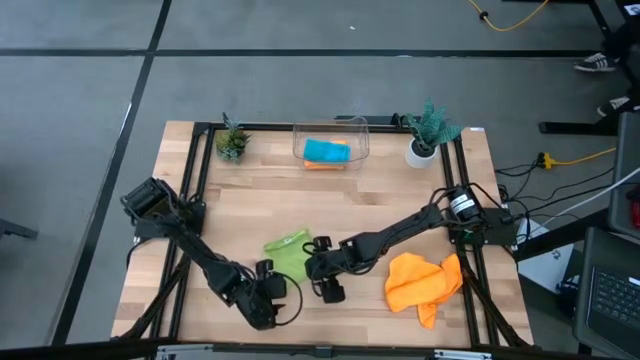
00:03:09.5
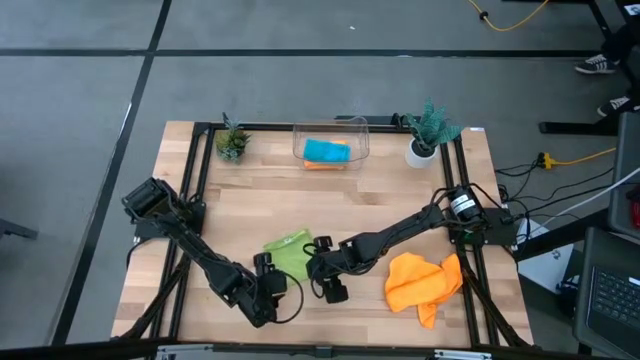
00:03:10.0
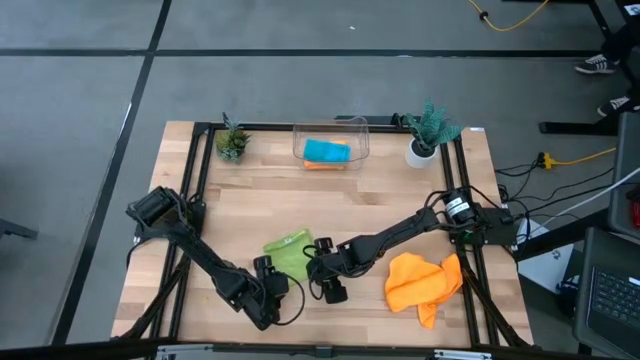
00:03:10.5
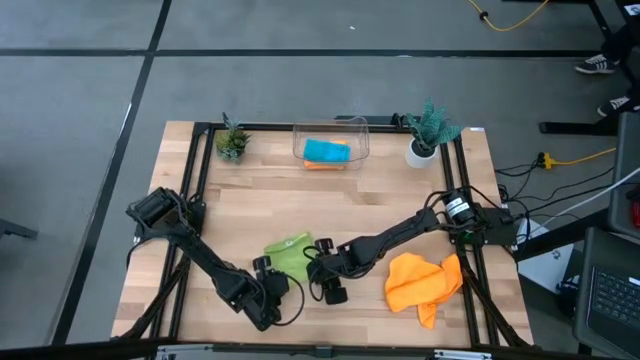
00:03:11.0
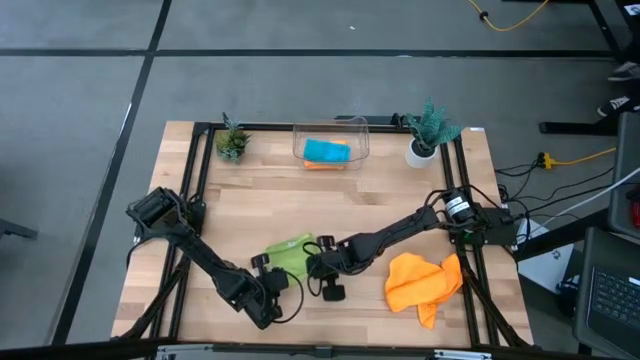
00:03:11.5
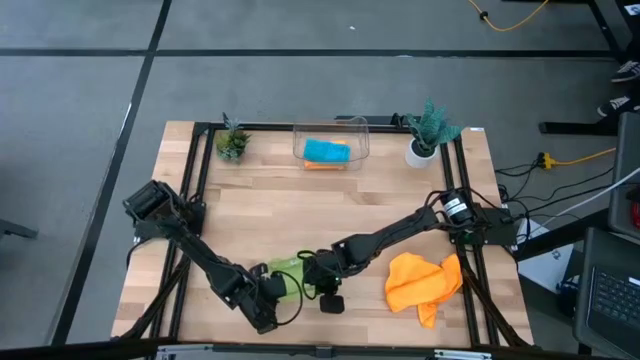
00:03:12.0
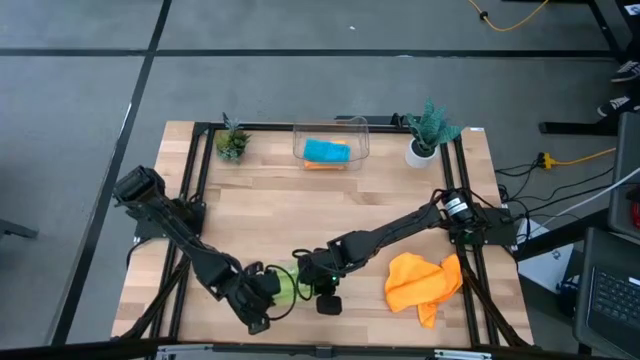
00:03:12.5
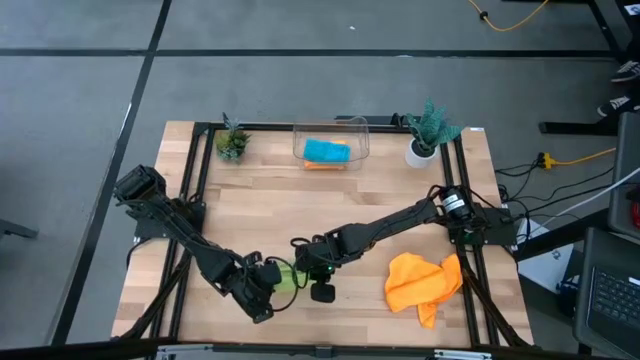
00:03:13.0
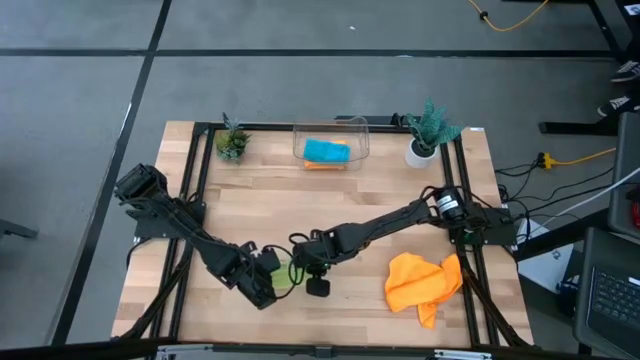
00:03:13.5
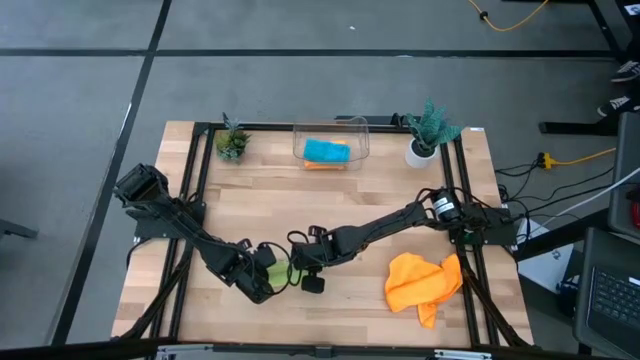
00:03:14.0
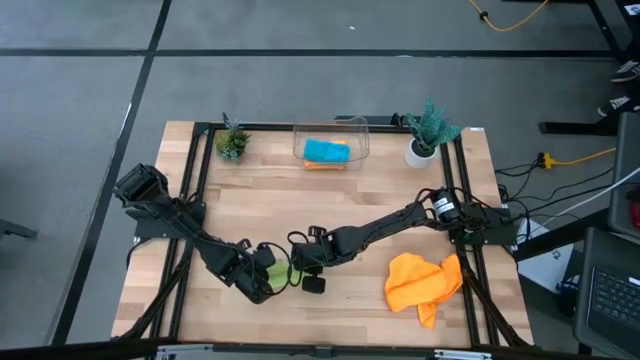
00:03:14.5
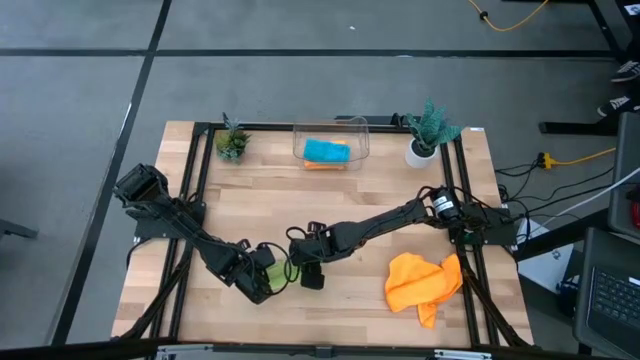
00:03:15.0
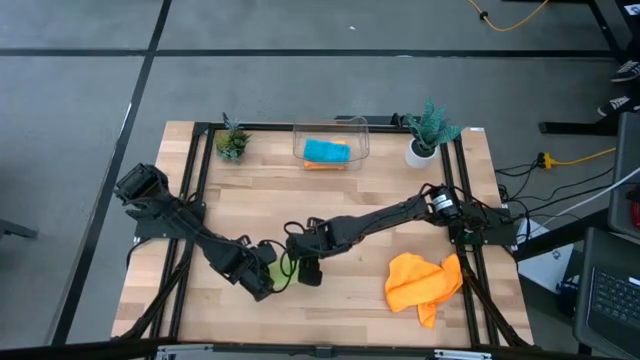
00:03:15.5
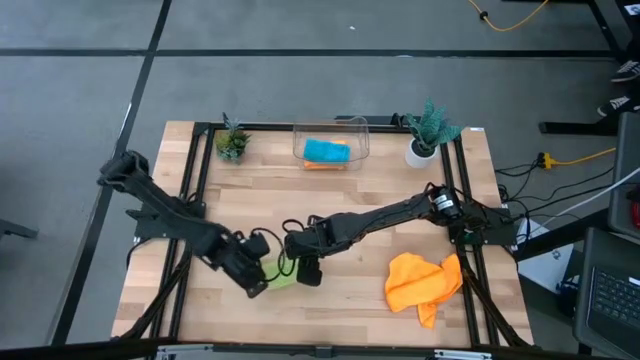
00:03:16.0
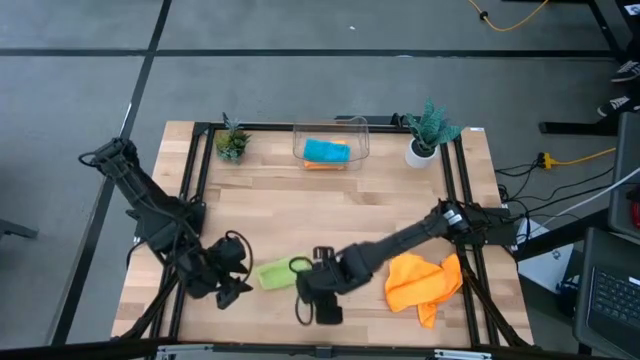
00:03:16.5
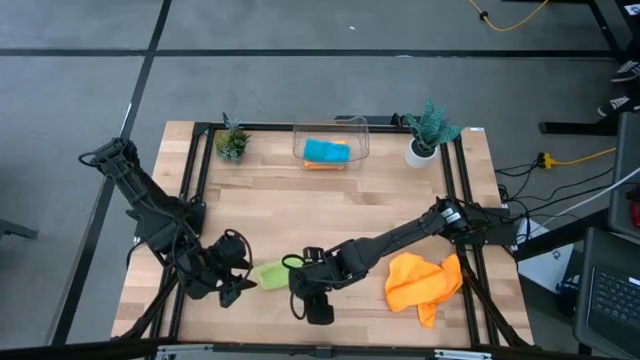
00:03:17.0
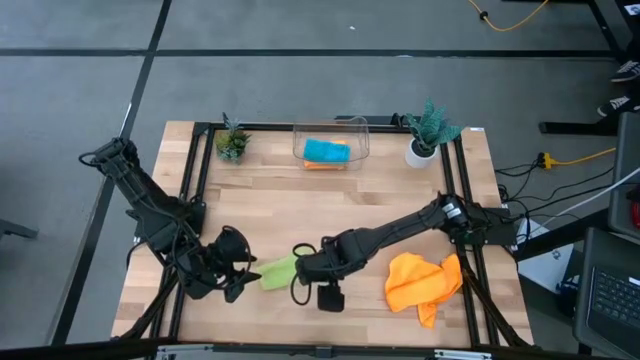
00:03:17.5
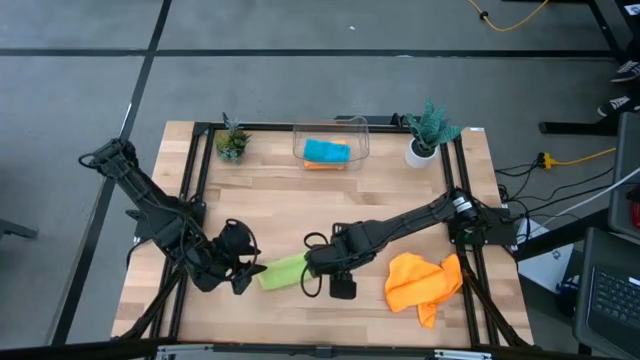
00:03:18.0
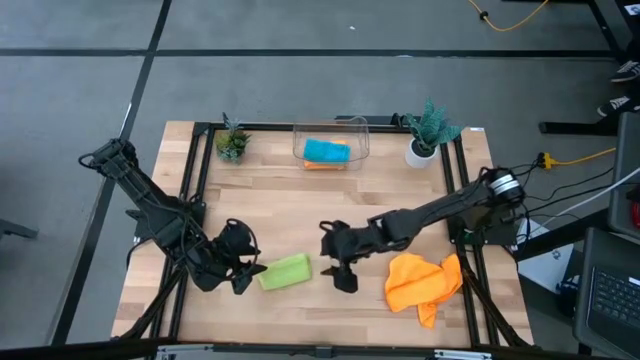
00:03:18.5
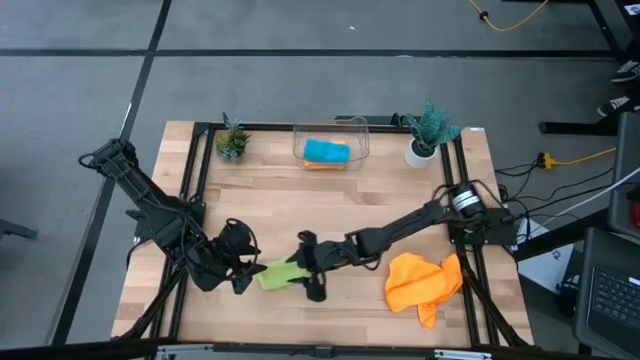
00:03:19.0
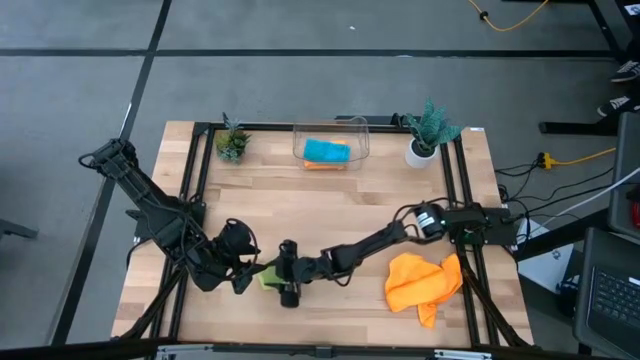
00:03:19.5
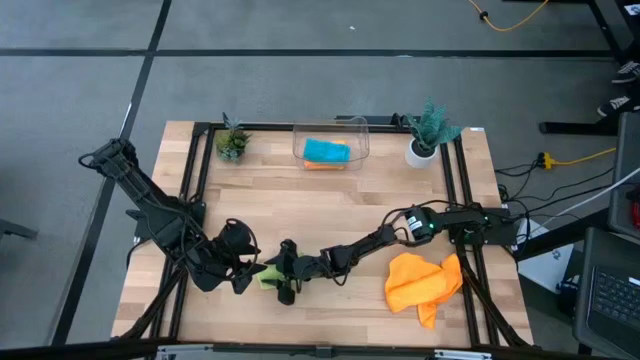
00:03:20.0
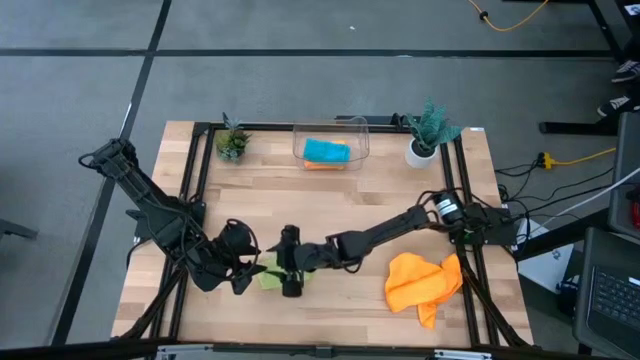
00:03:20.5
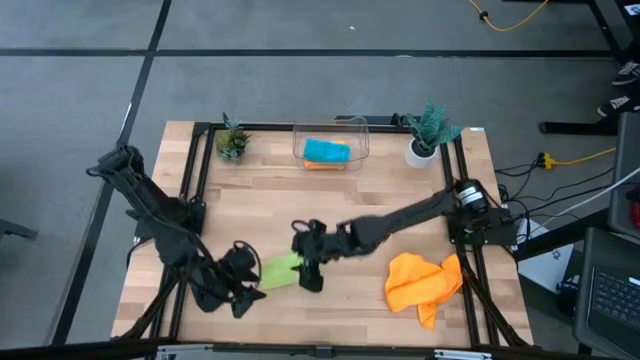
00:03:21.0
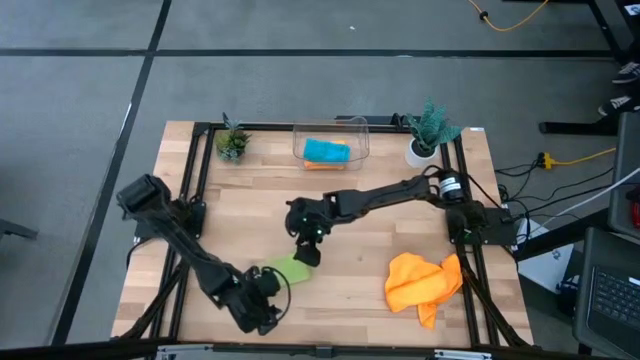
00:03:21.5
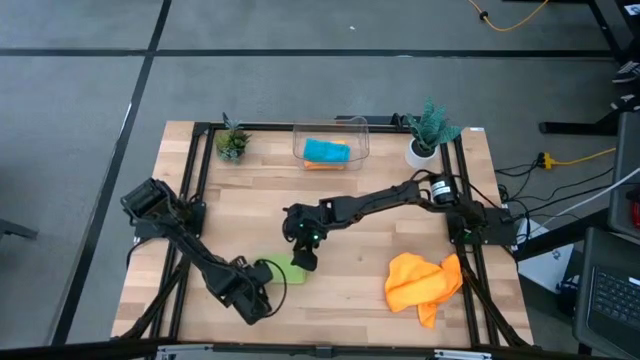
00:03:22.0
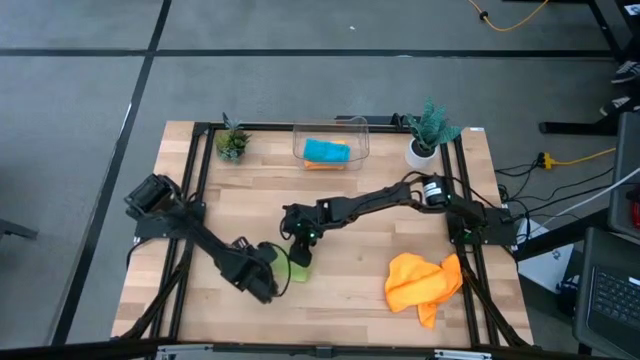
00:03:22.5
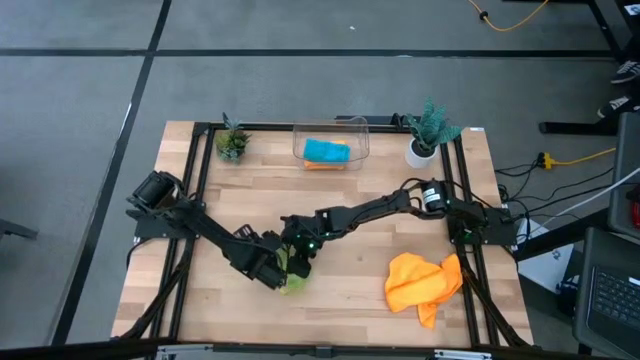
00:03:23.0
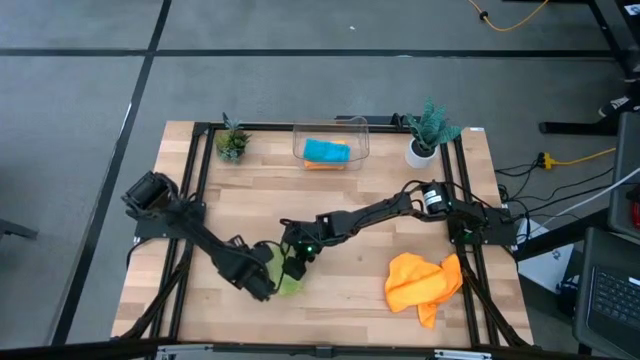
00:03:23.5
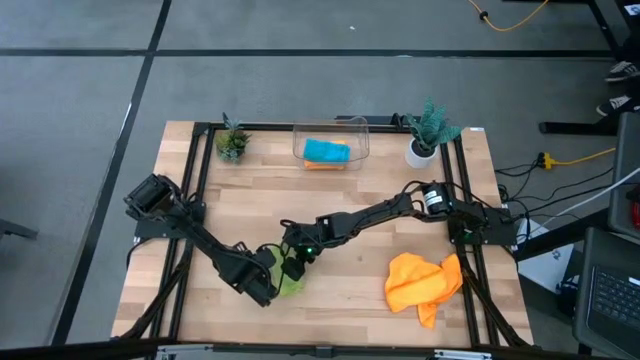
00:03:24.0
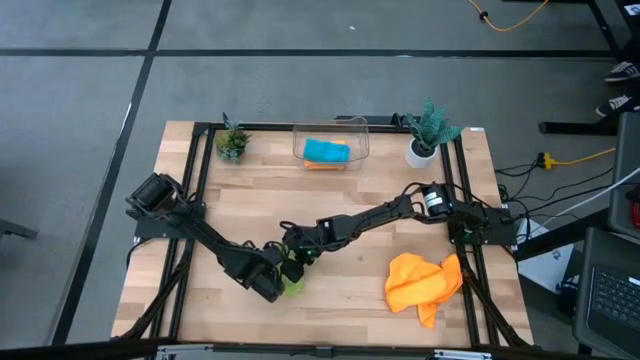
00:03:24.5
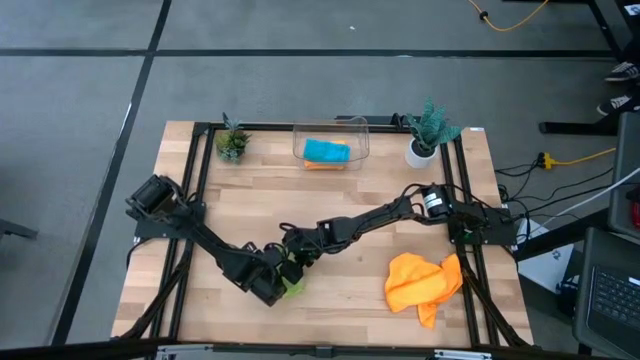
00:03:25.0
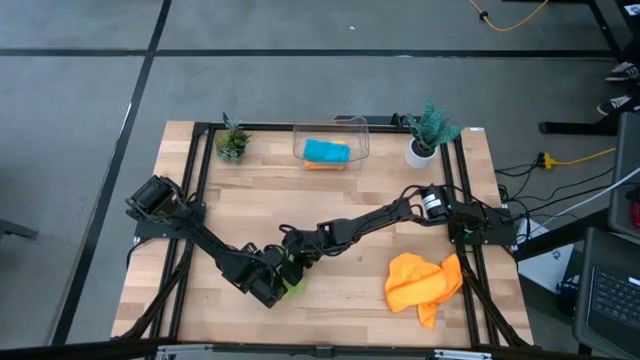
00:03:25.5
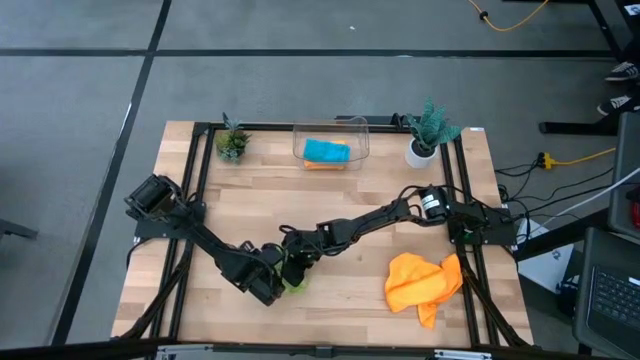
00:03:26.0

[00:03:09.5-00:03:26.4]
Task: Fold microfiber towels
Fold the green towel

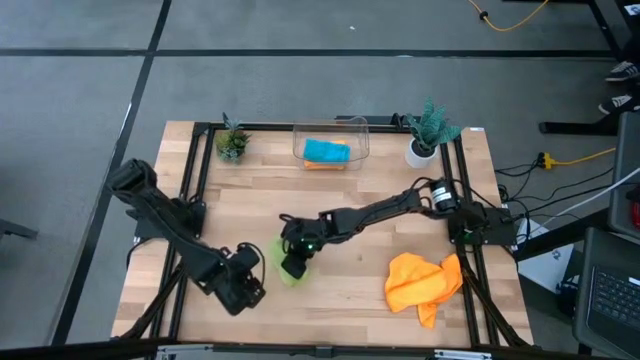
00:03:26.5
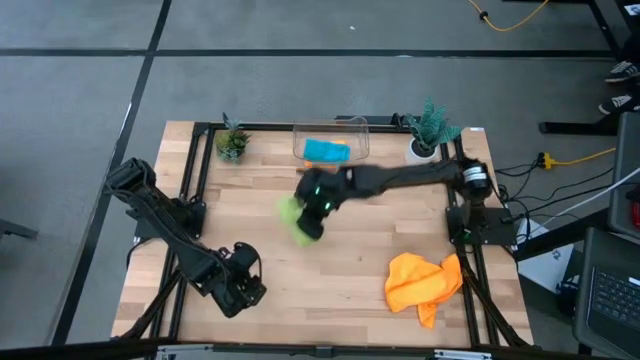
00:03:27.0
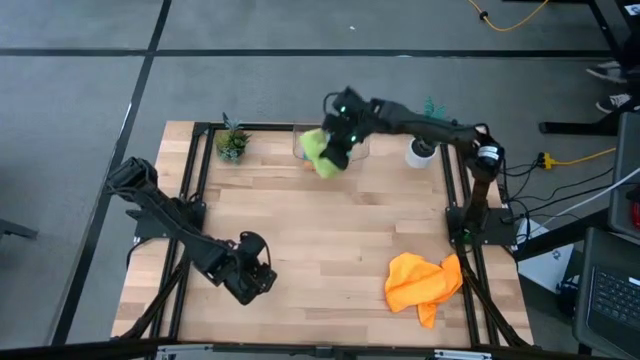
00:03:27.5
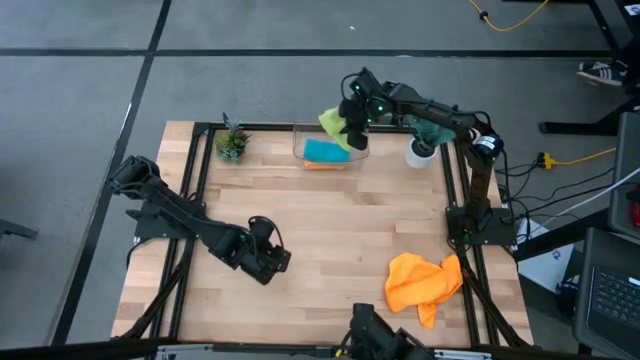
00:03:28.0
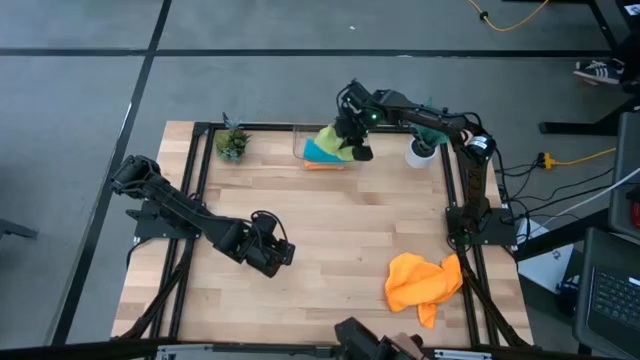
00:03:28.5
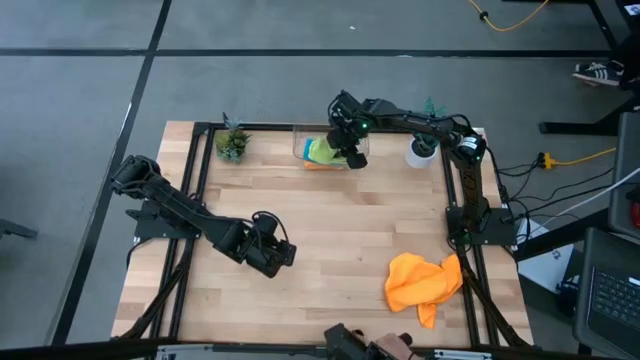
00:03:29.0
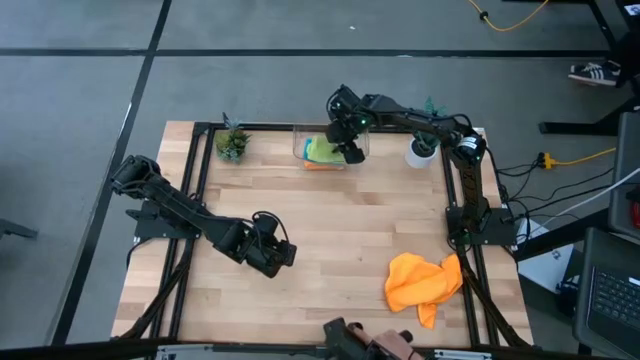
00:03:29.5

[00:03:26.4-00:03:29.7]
Put the folded green towel into the transparent bin

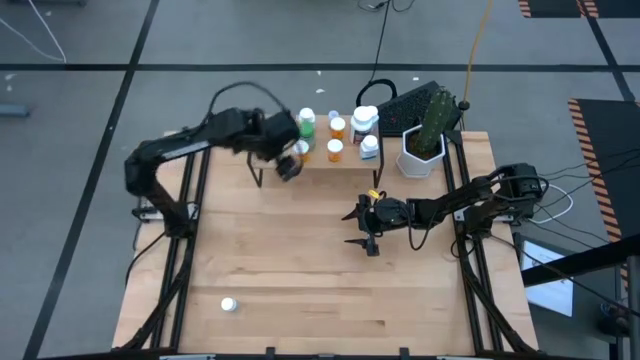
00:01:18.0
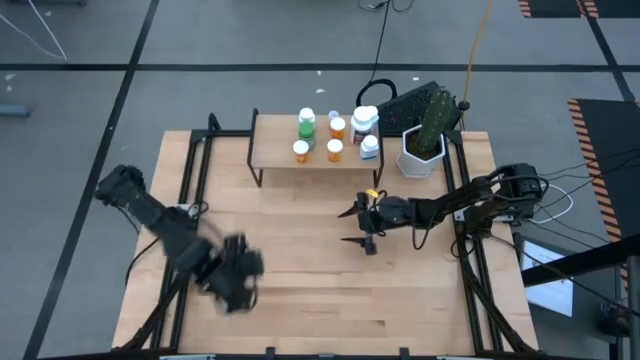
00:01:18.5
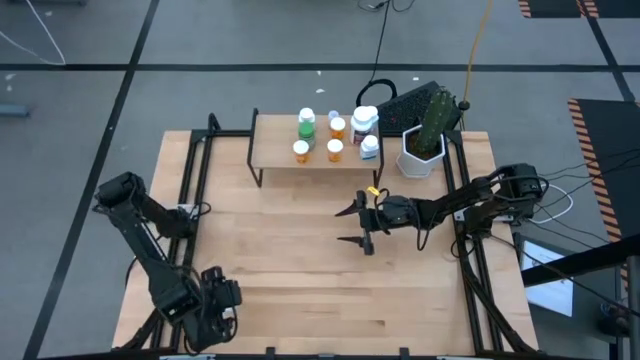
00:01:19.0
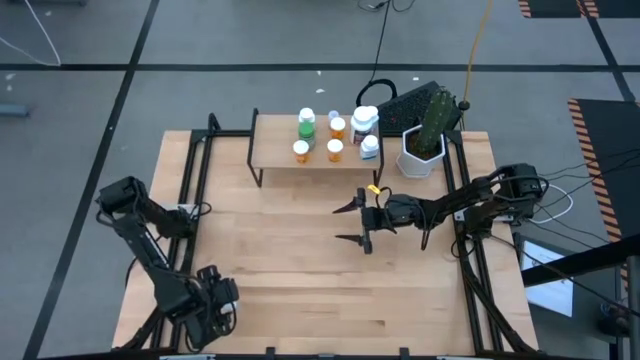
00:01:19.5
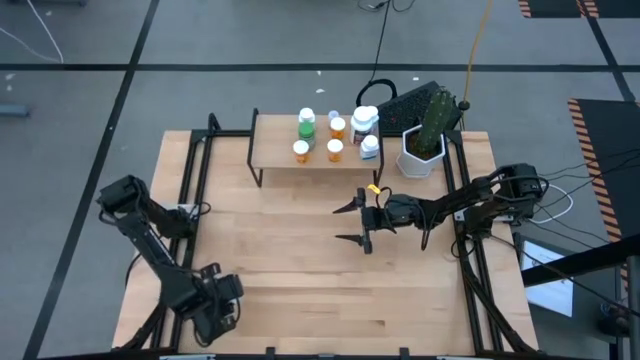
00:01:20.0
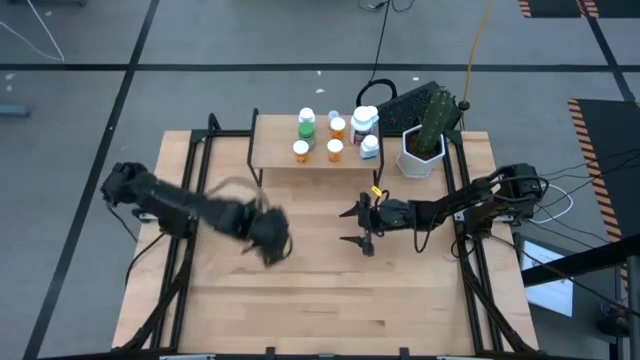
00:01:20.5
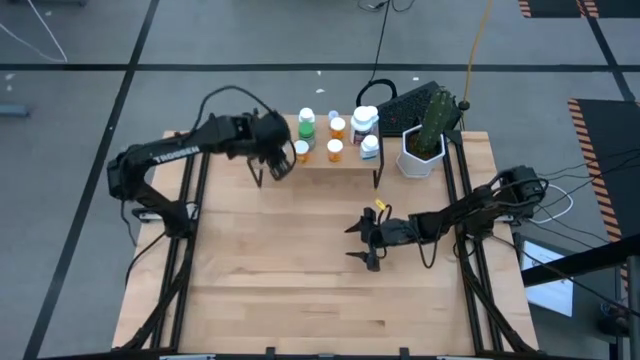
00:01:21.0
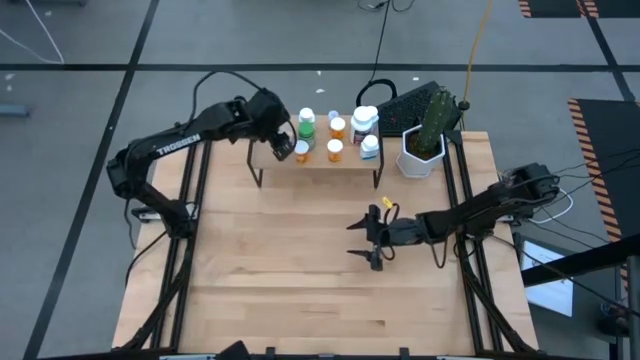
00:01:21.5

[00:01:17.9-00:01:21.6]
Task: Pick and place medicine bottles onto shelf by color
Put the white medicine bottle on the shelf
